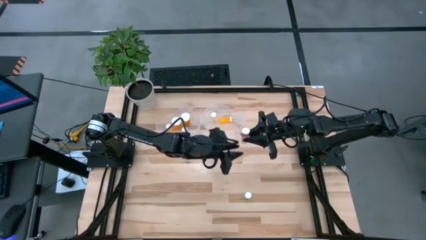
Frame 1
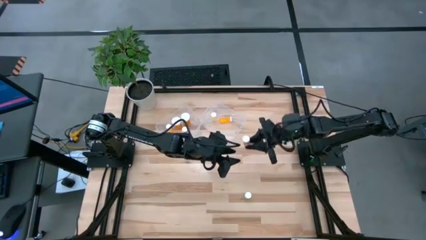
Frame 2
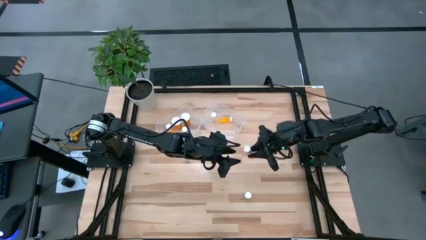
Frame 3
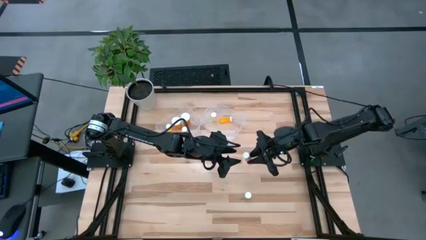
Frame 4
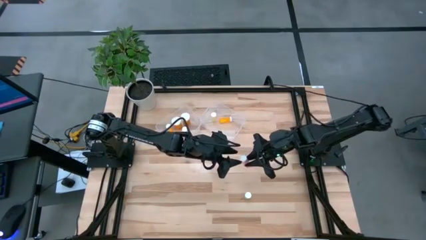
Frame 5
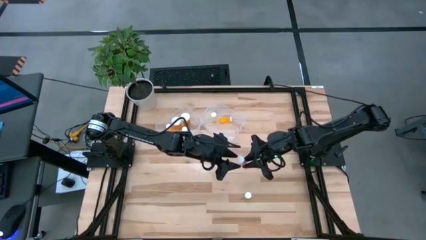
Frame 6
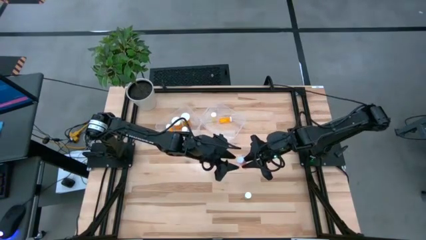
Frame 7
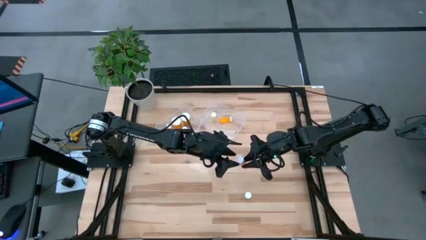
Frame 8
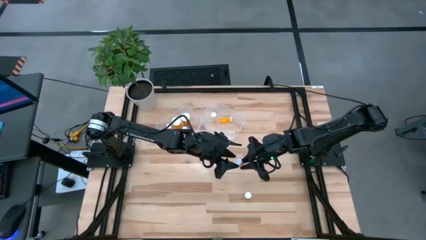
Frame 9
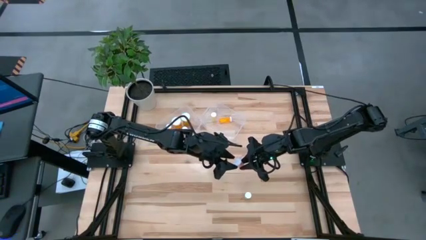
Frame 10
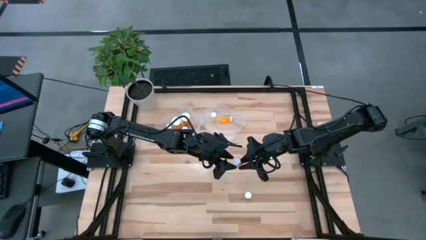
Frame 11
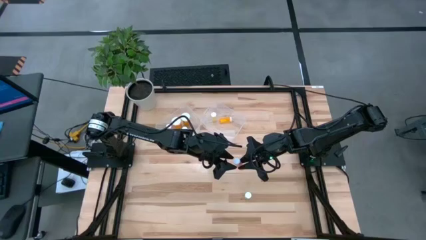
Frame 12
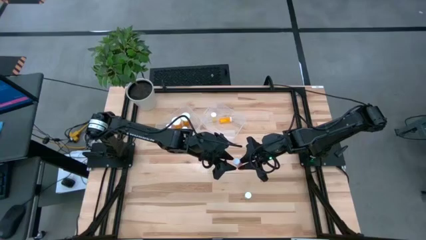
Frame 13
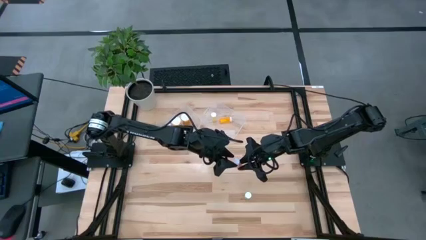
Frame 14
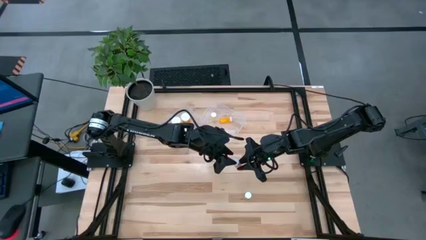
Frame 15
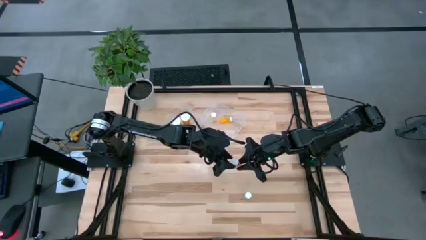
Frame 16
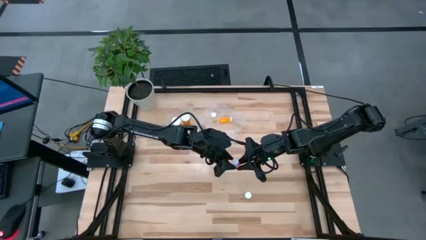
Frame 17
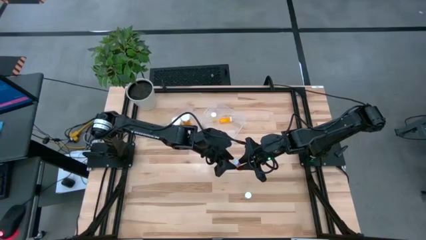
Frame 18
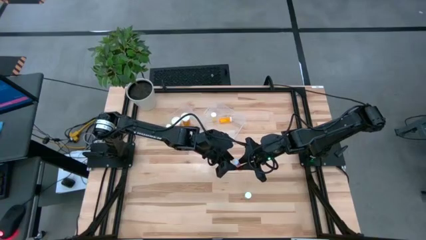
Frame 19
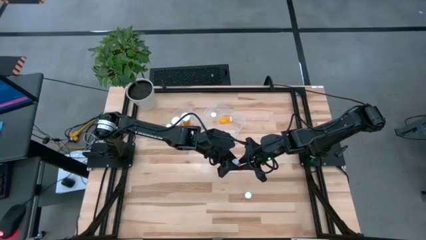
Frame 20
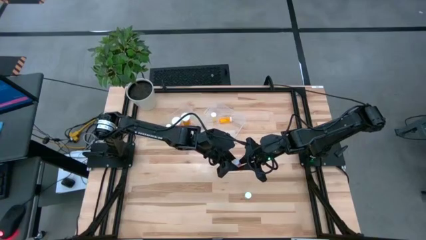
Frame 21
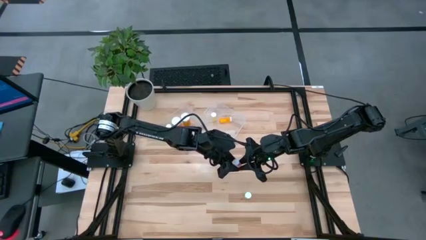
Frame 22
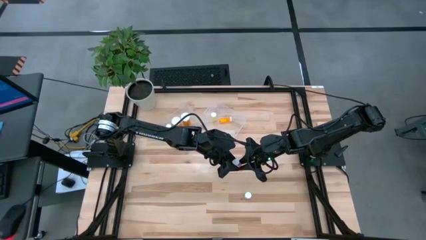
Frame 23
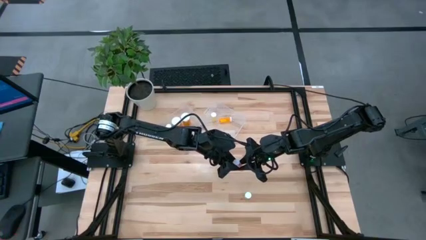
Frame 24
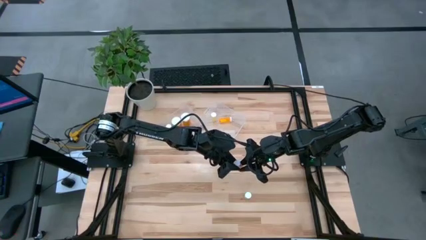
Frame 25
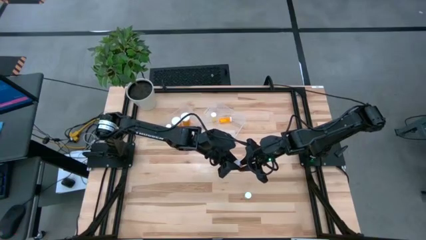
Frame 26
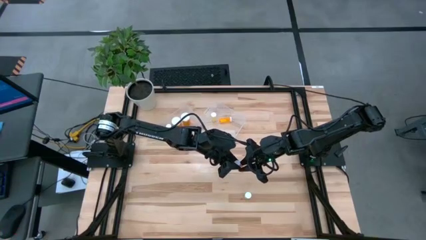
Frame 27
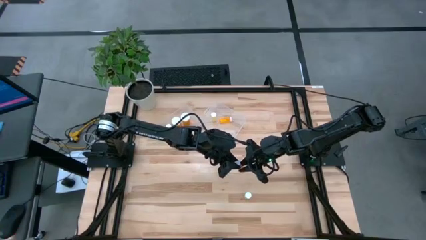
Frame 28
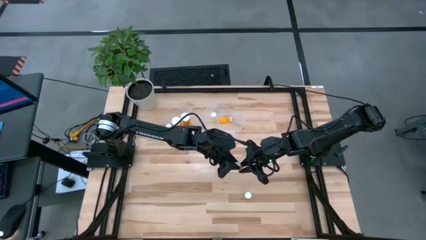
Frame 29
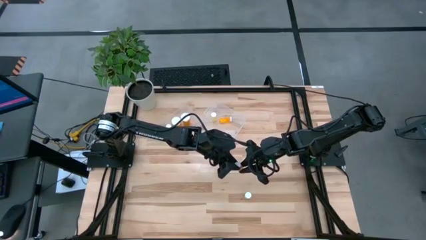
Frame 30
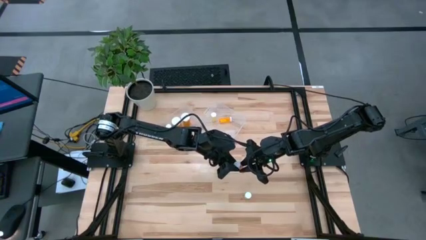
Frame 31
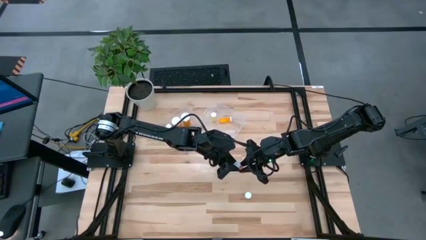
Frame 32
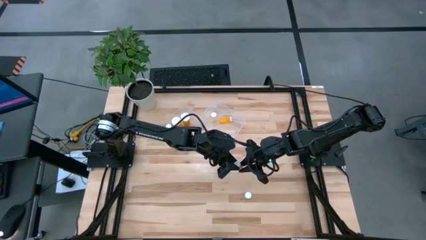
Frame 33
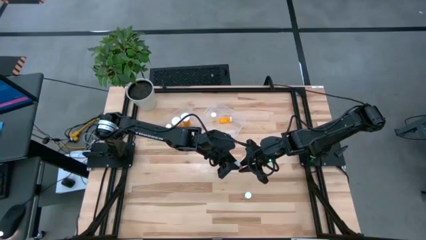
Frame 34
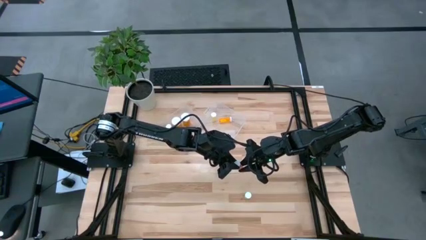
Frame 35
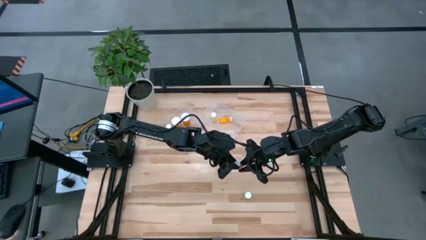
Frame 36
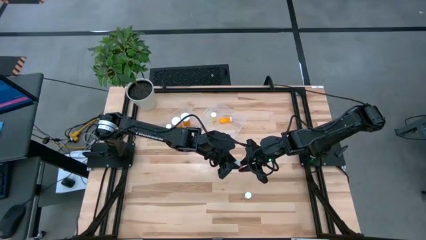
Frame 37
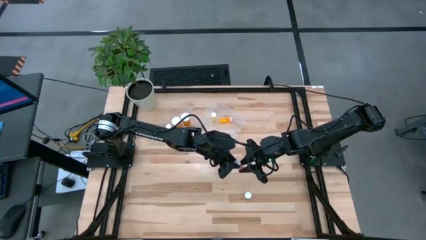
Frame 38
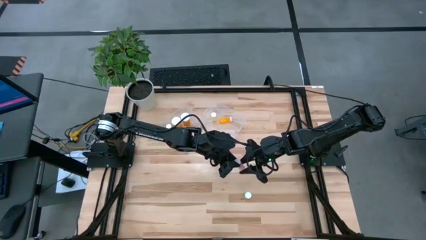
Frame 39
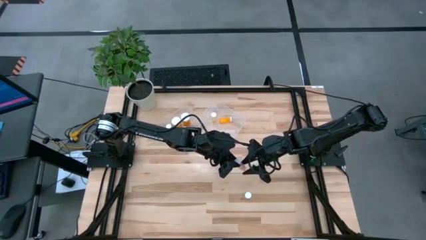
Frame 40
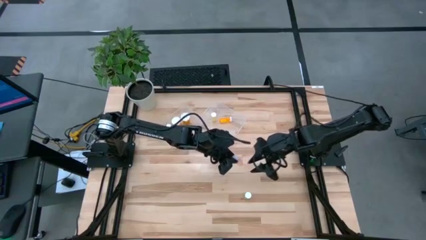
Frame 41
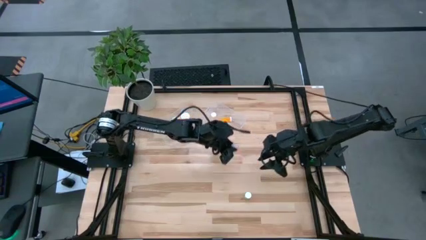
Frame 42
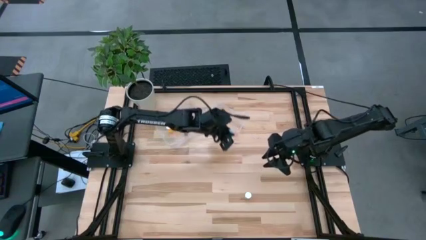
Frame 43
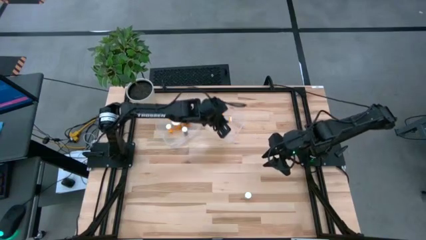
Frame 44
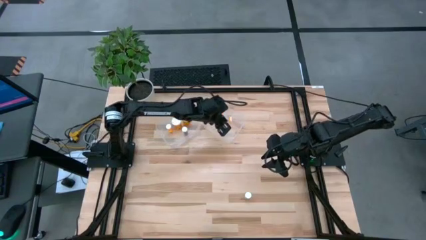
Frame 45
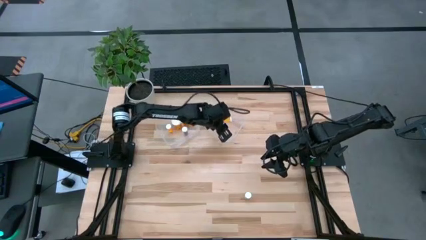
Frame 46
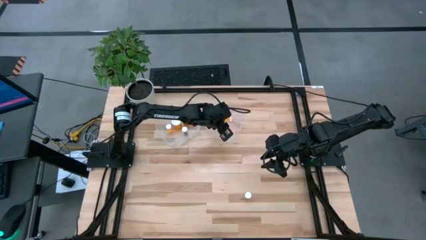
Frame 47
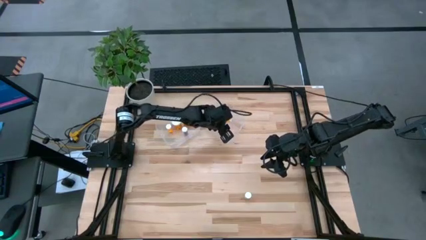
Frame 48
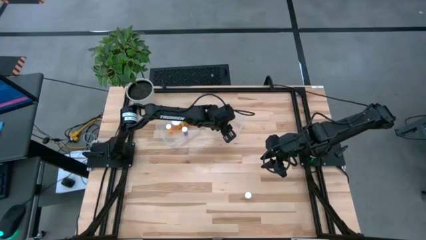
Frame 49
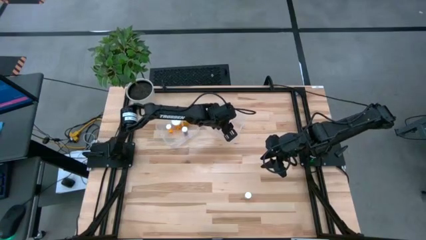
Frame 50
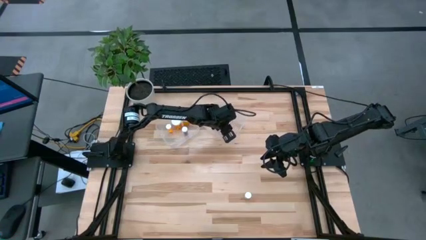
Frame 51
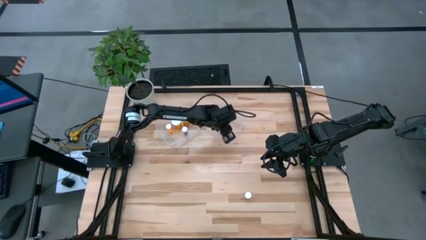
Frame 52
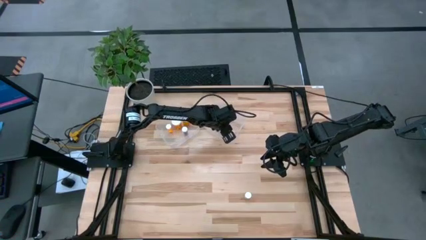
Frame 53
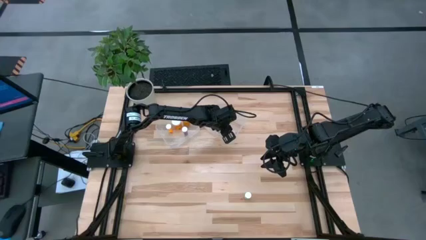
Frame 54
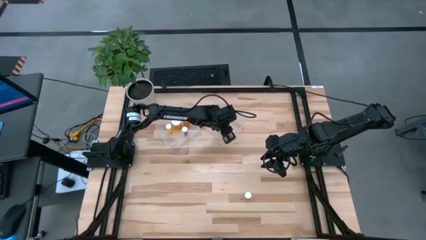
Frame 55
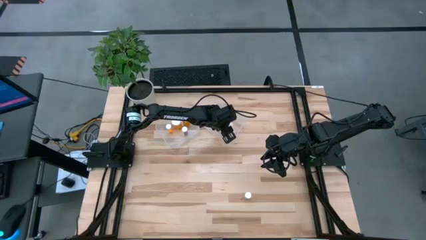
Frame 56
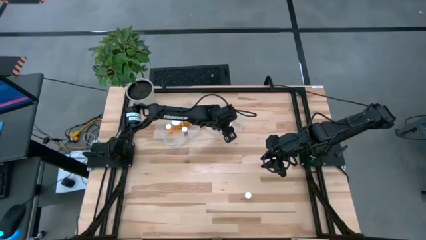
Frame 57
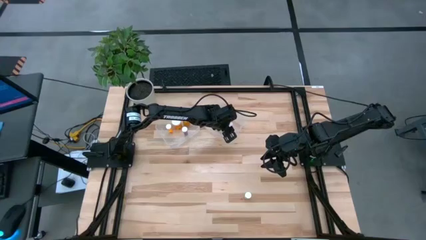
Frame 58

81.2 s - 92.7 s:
Task: Pick and place medicine bottles into bin by pill shape (circle, oval)
Put the small pink tablet bottle into the right transparent bin

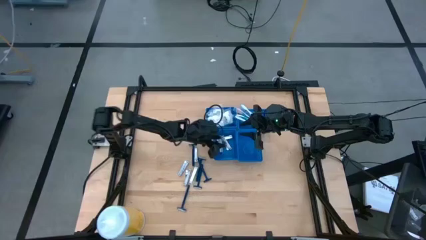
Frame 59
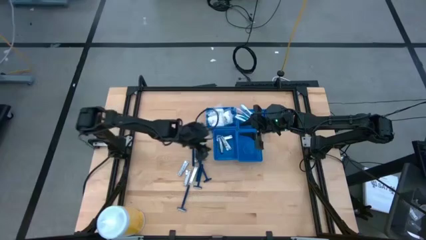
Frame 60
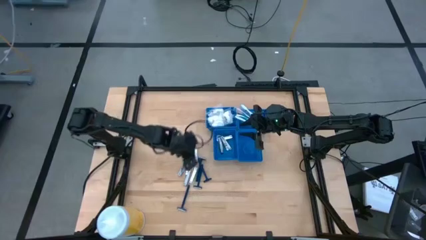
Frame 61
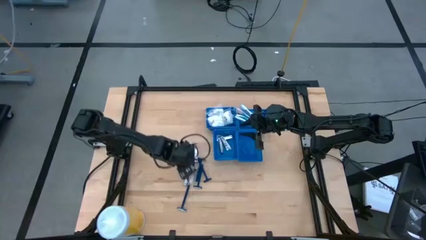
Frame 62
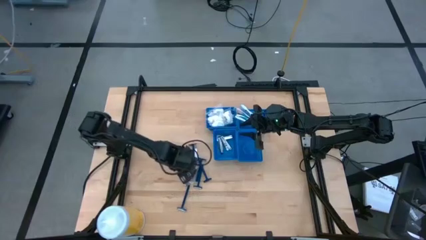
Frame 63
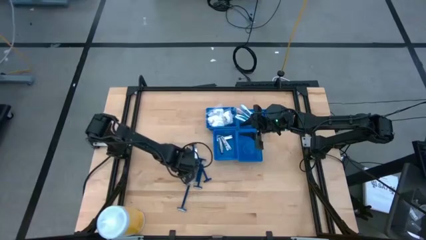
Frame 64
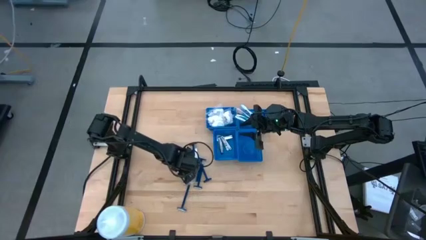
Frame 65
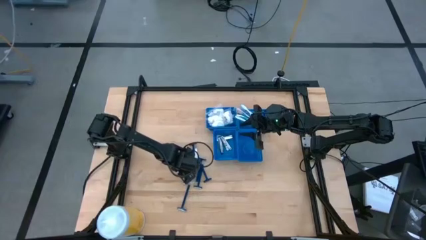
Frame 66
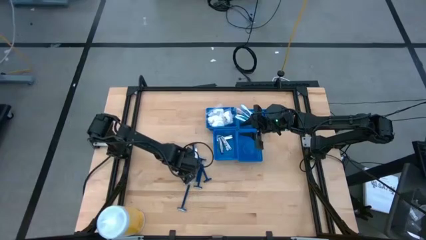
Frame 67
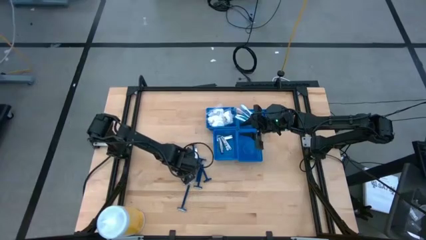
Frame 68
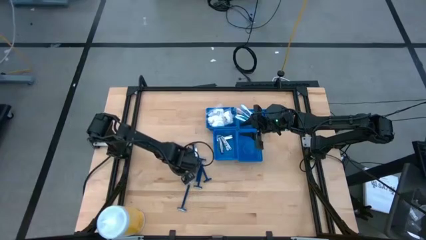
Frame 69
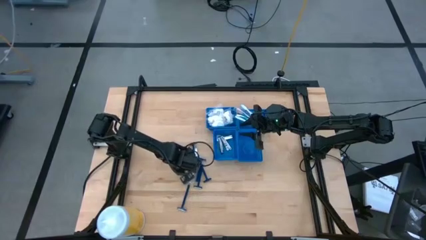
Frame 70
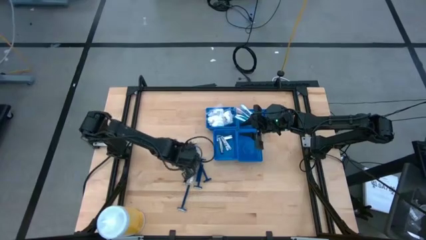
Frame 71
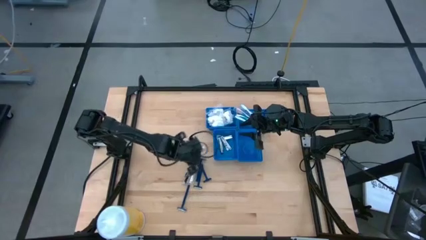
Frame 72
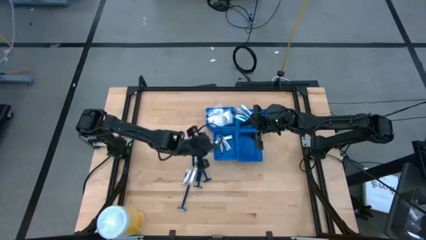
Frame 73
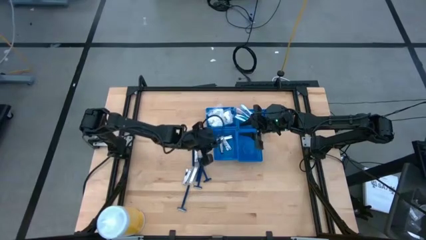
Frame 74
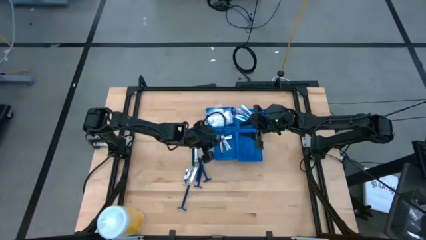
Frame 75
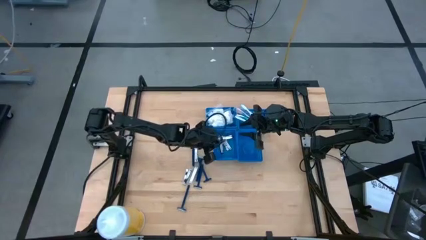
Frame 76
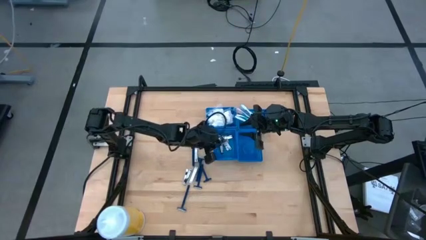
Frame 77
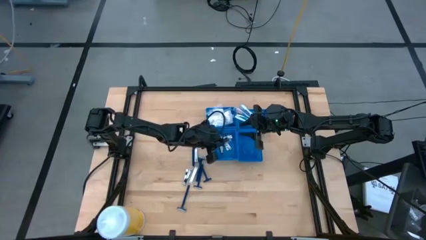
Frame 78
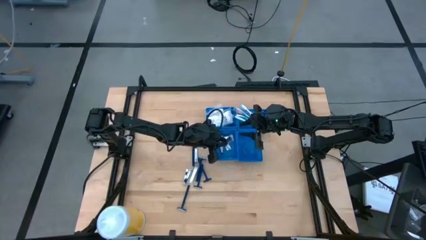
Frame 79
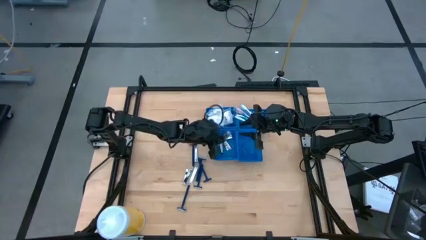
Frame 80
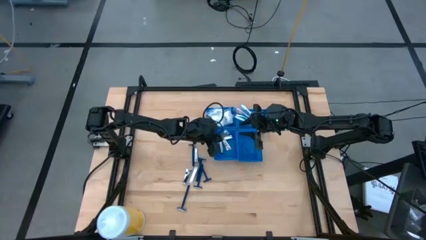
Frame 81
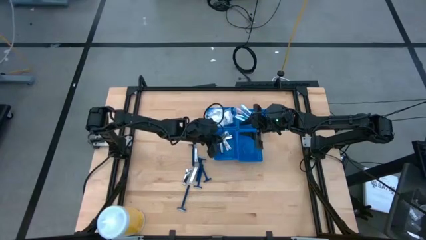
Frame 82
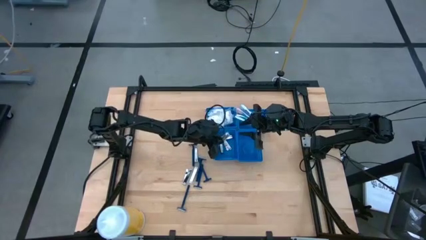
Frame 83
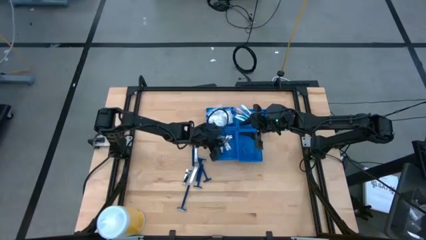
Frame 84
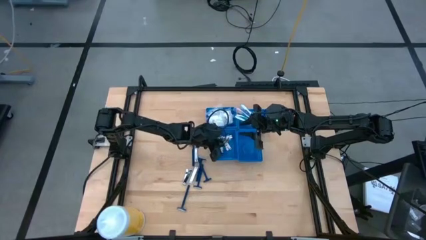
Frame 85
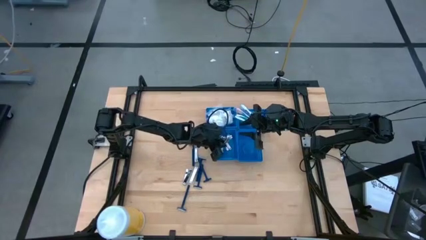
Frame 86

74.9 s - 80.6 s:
Task: Pick & Place Travel size toiletries
Put the silver nail cutter into the bottom left blue basket
